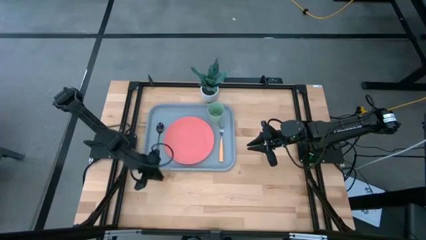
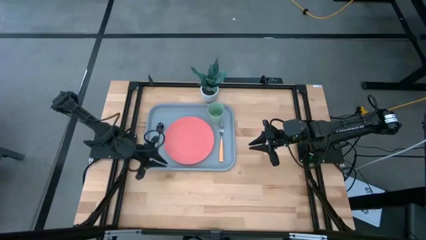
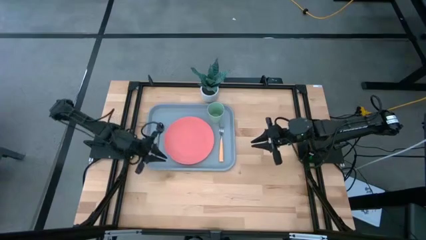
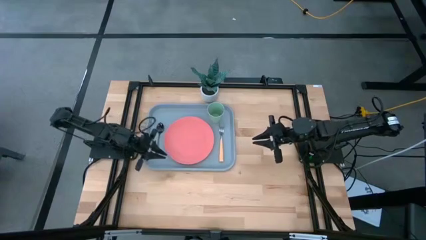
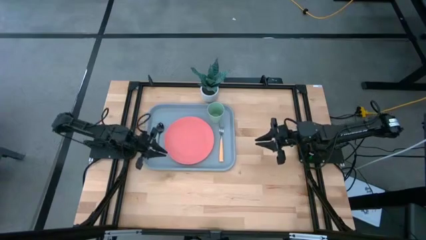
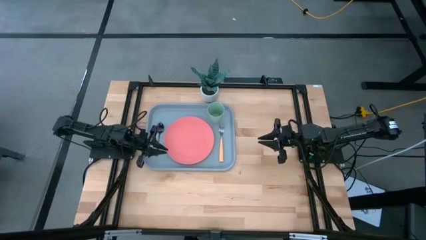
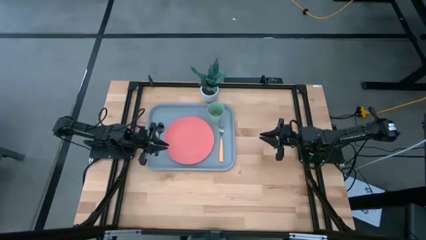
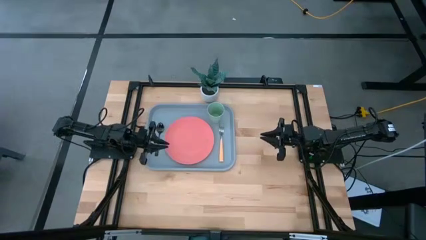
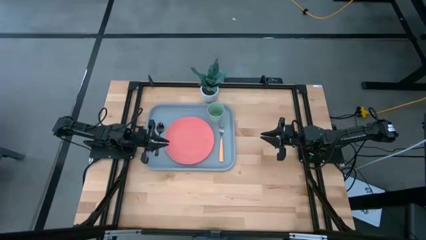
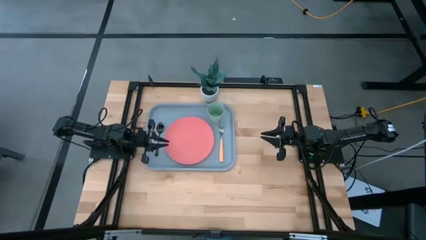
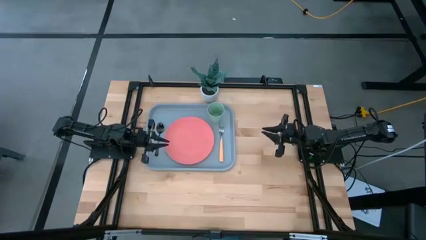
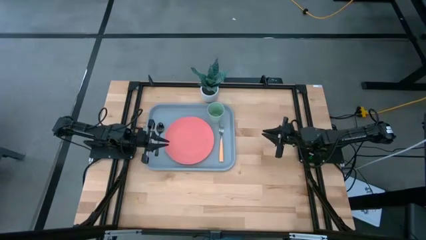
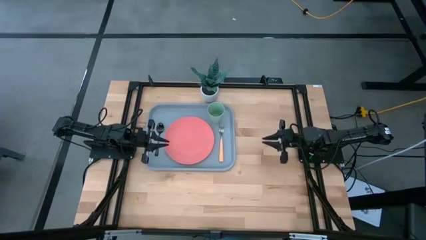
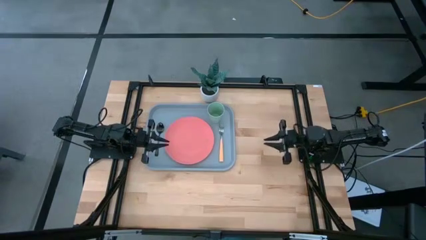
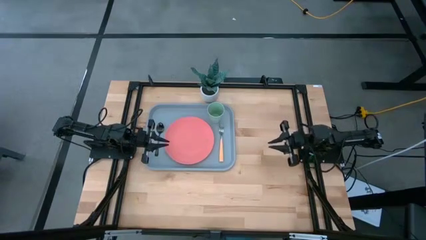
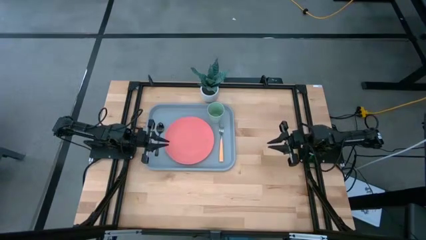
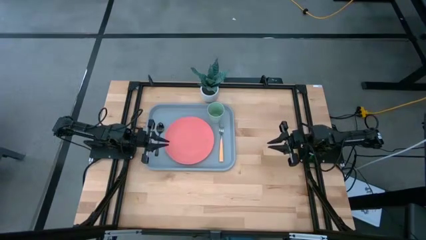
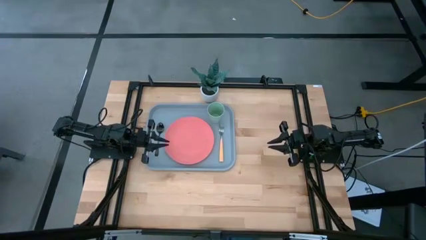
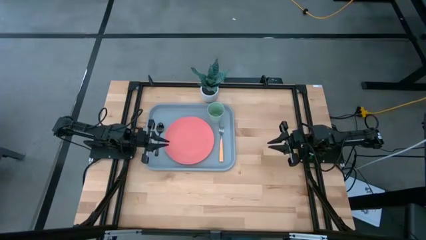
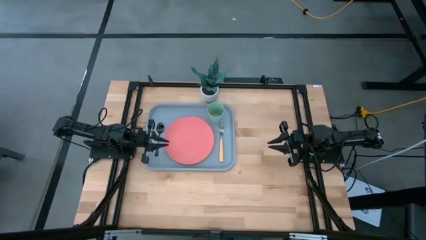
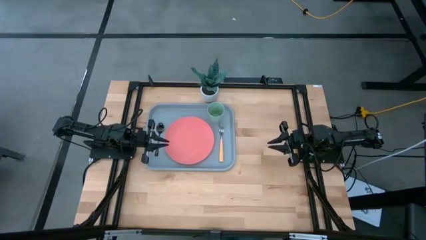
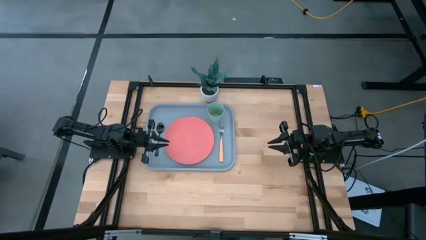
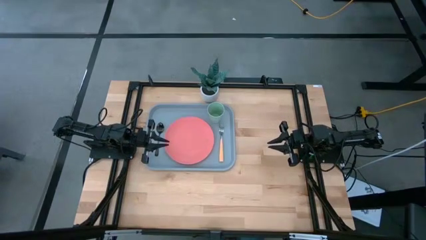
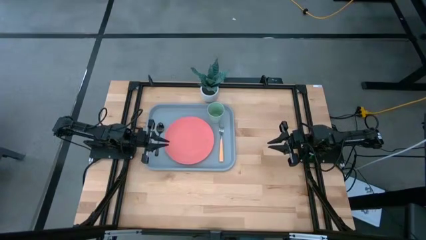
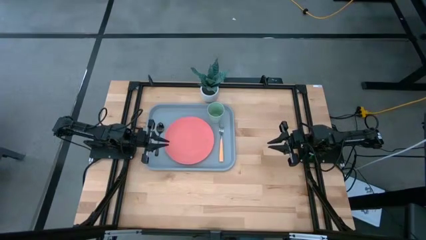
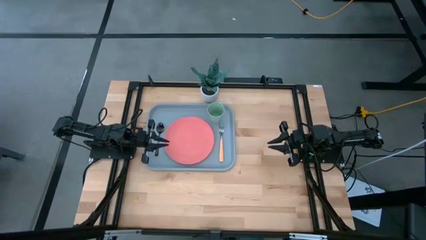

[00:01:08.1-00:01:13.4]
Task: Pick and place plate/cup/fork/spoon on tray
Return to Home Position

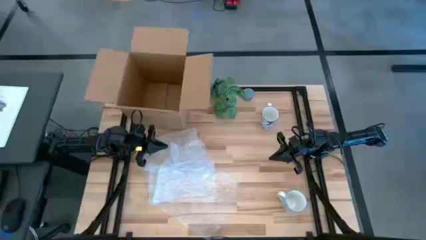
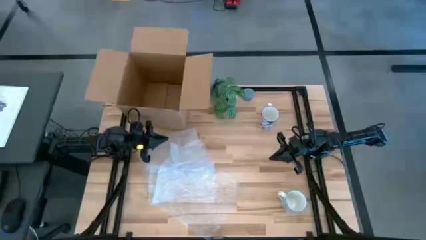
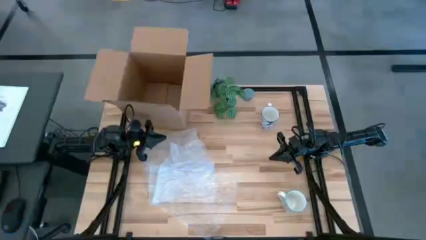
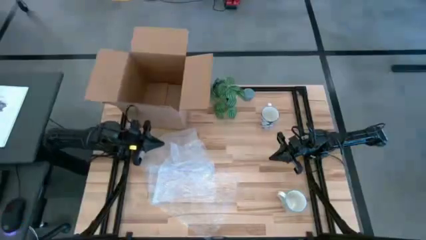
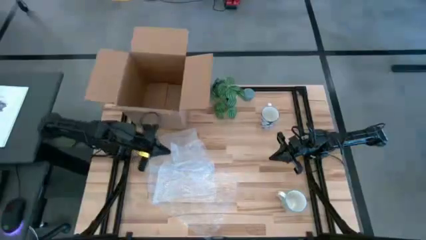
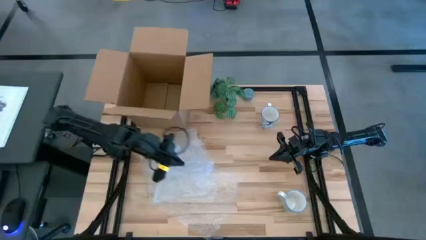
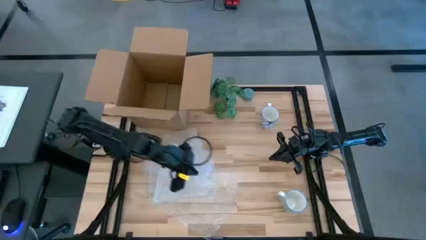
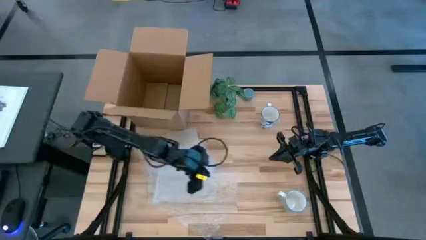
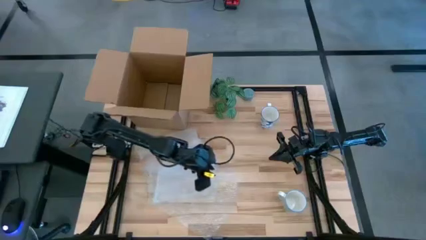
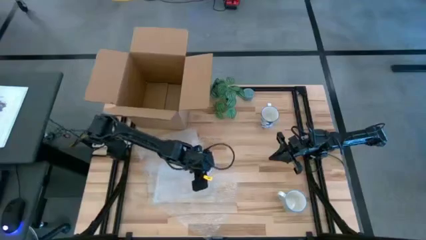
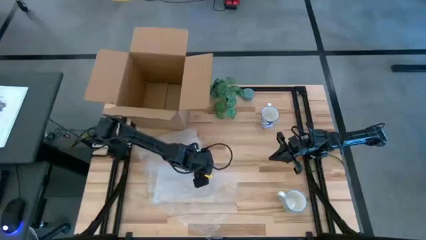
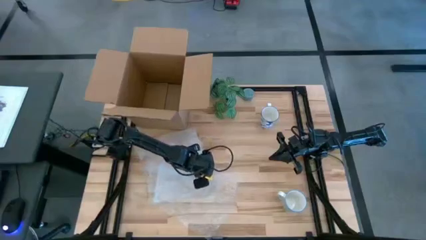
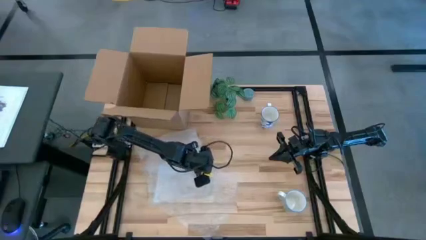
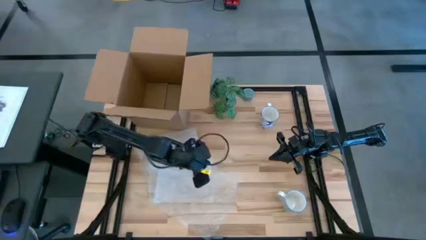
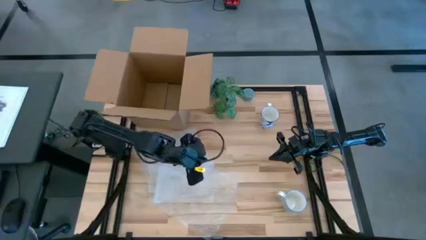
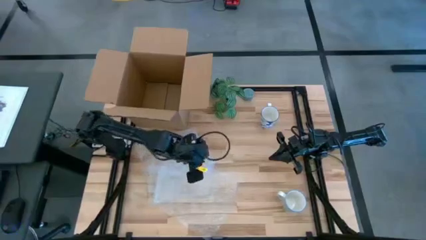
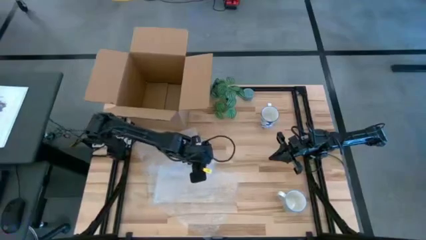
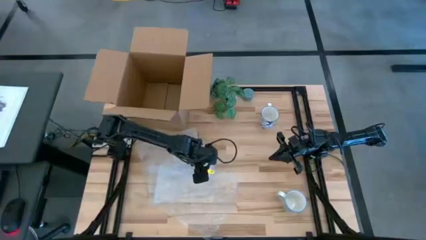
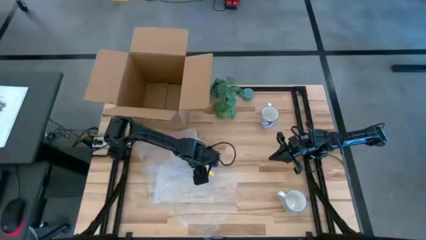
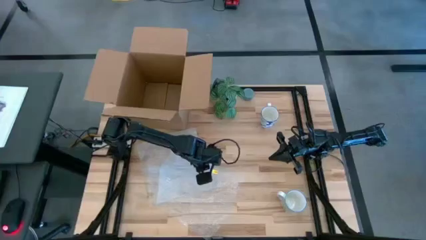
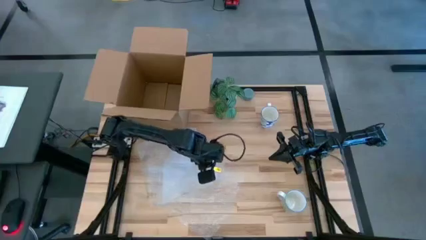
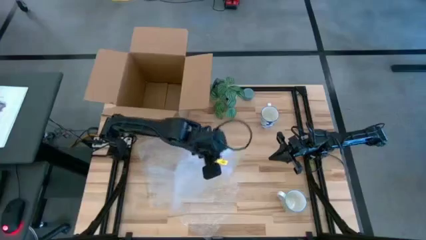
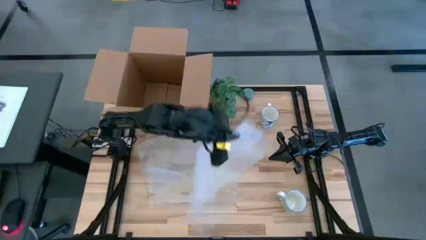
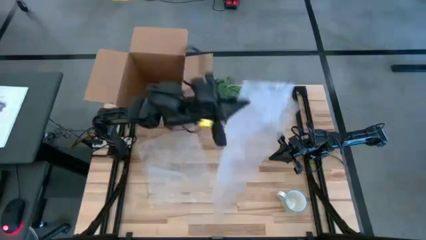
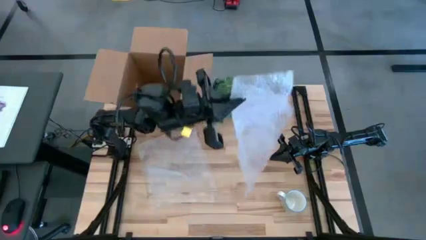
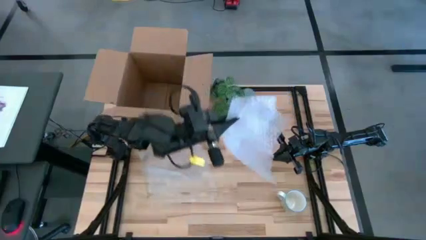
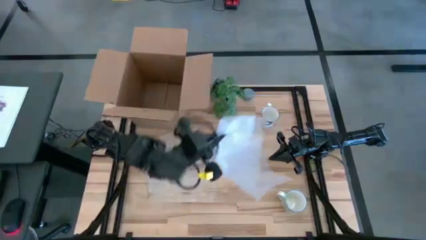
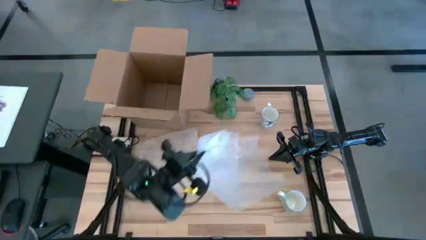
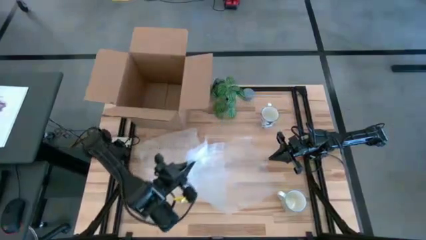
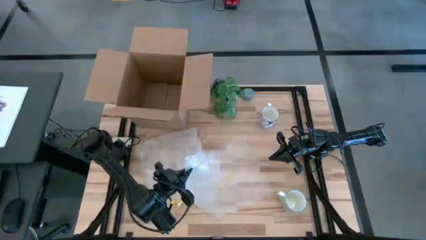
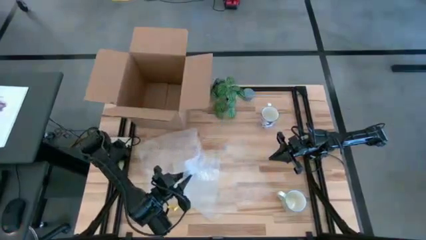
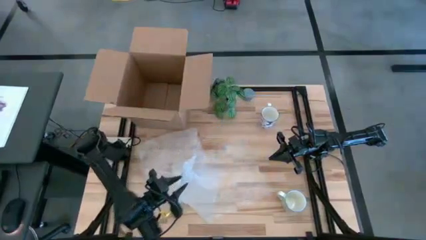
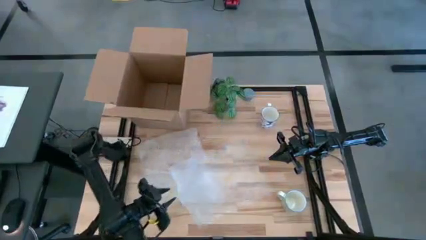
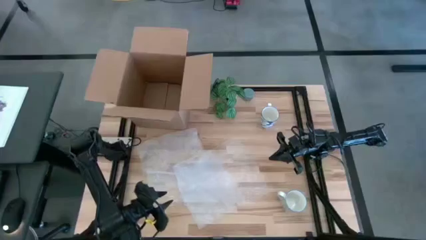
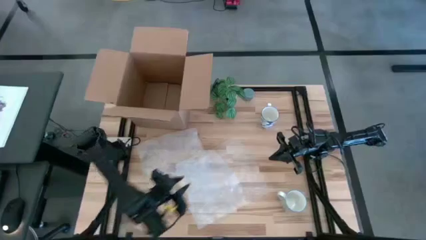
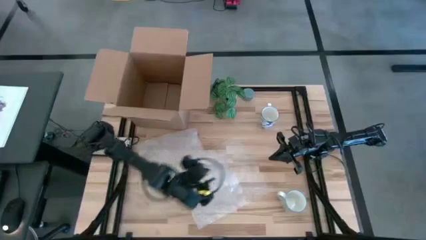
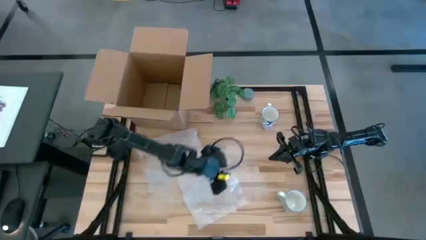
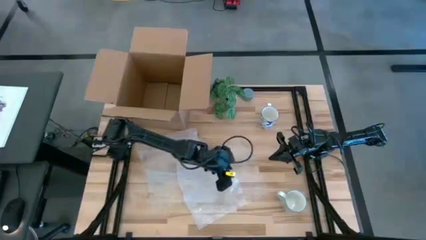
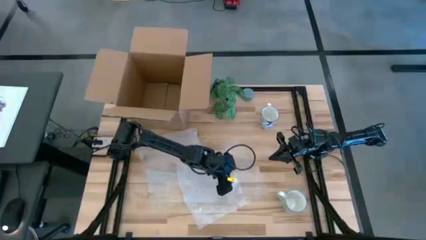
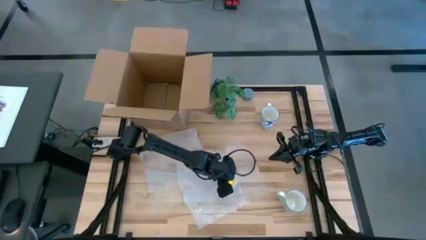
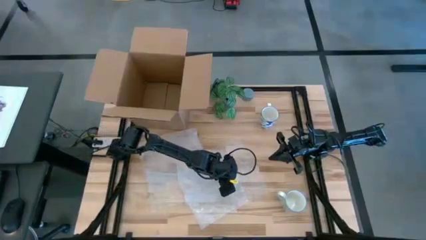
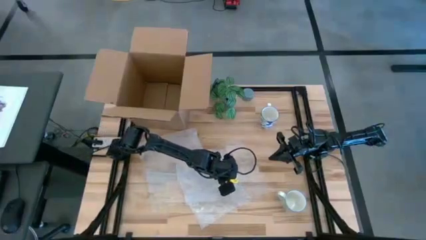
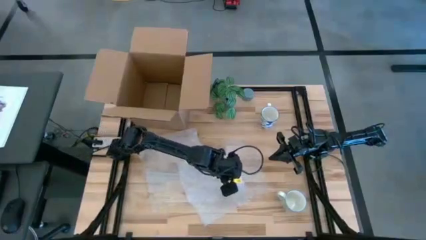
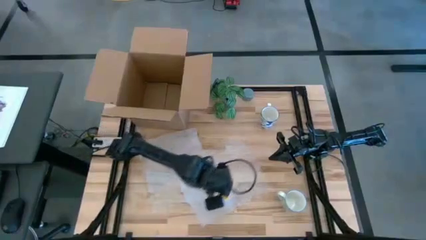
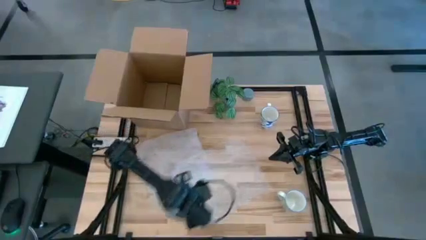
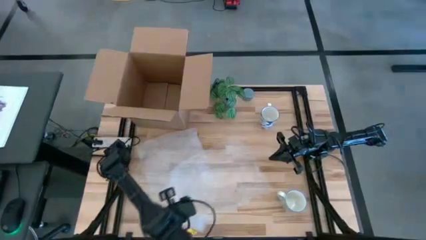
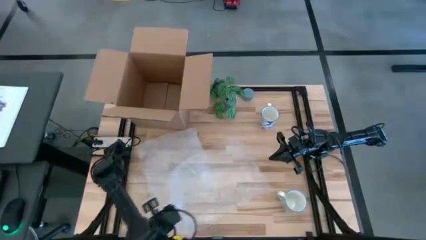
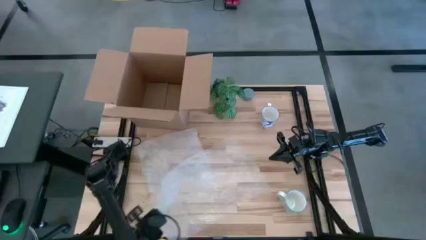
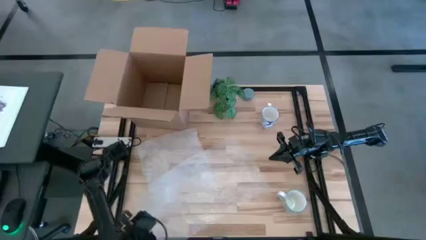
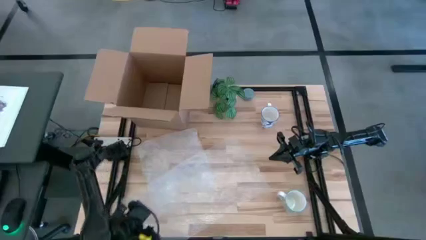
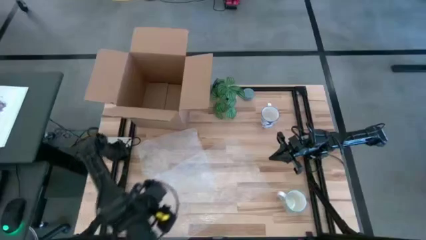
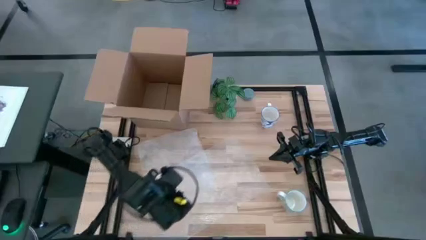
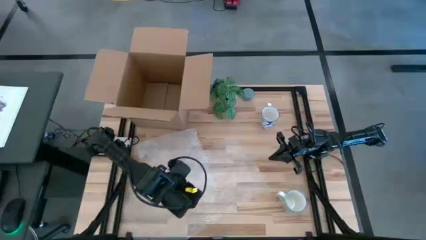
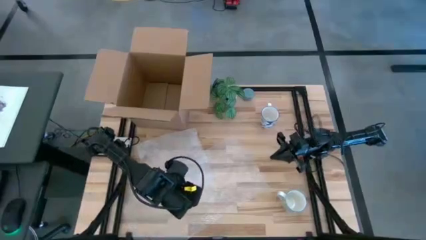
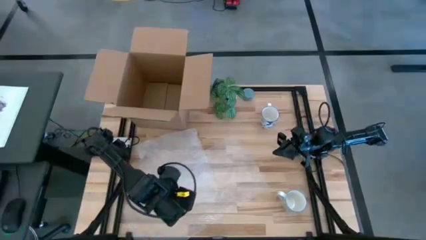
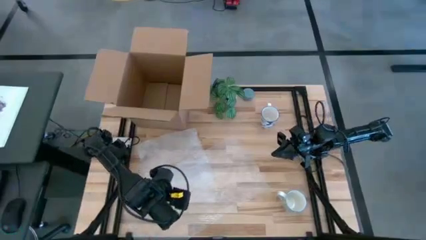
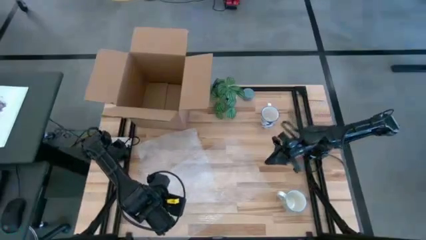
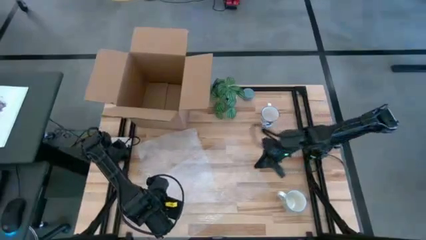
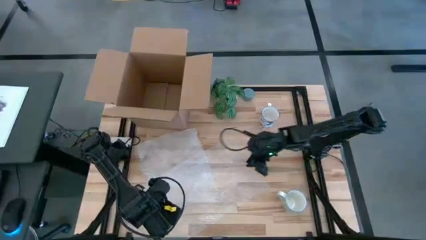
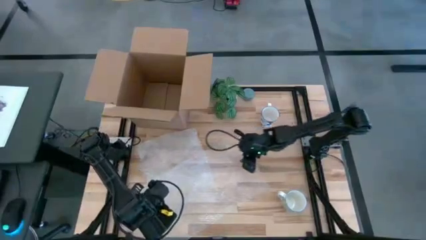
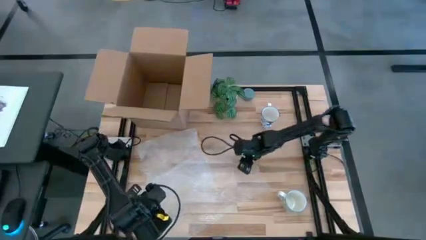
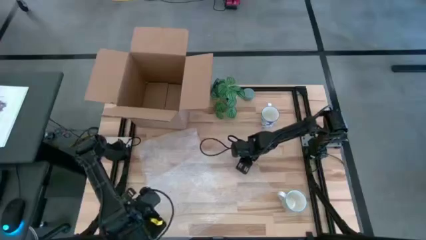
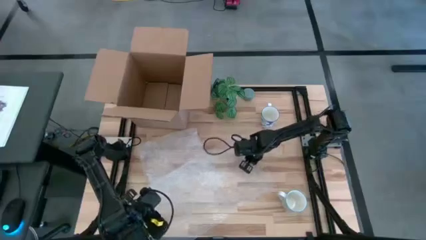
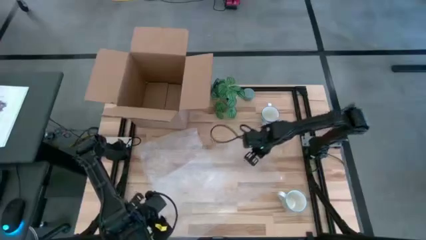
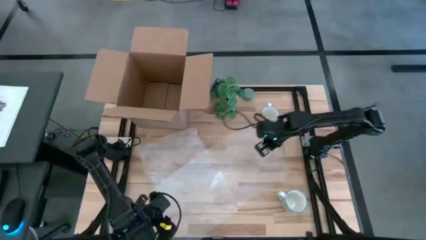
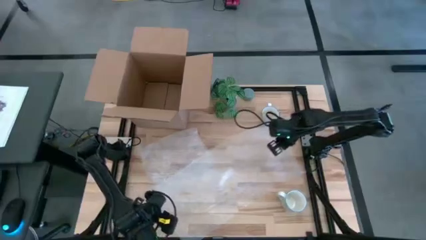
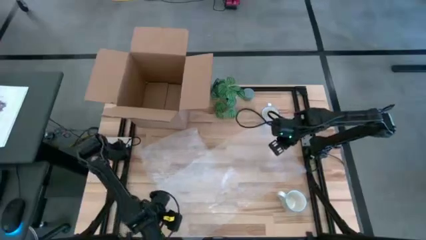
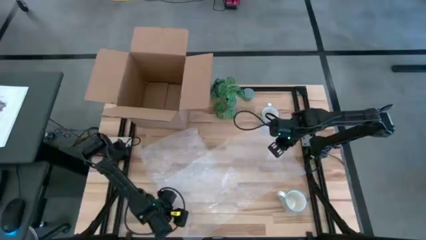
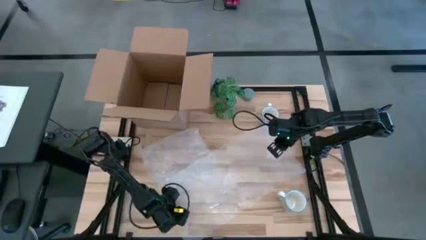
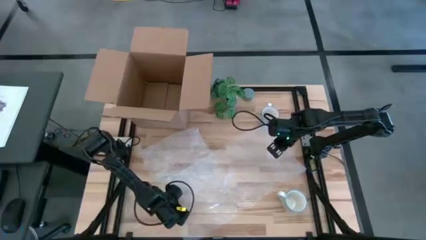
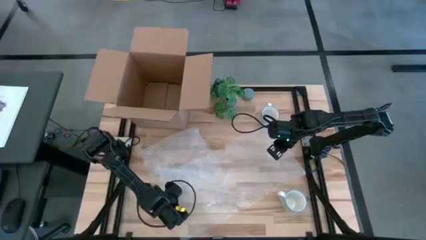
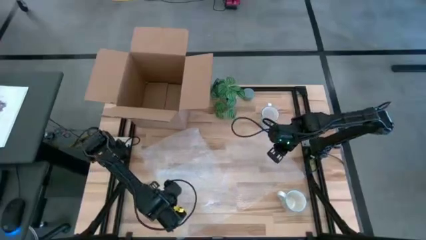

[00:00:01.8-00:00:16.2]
Task: wrap mug
Wrap the green mug with the bubble wrap
